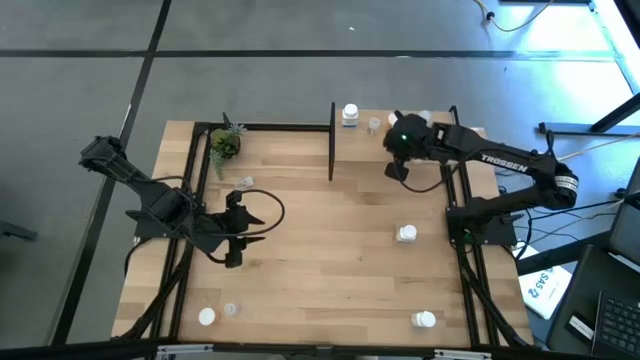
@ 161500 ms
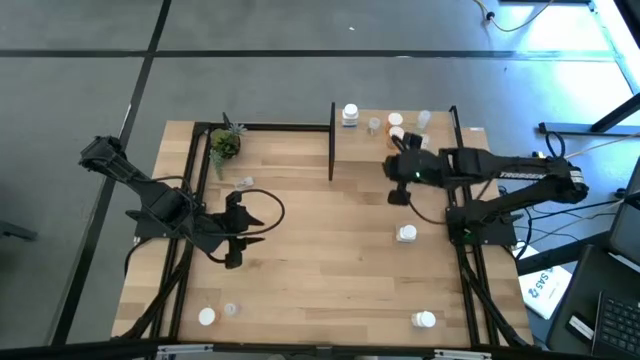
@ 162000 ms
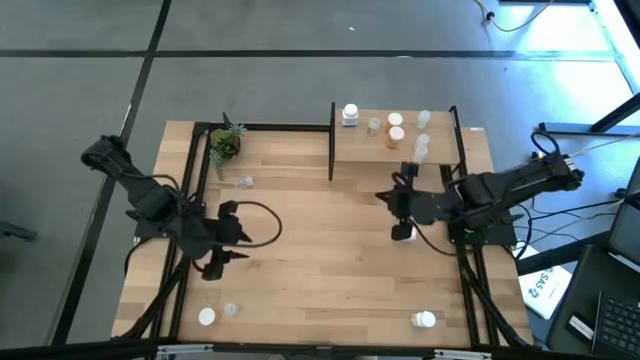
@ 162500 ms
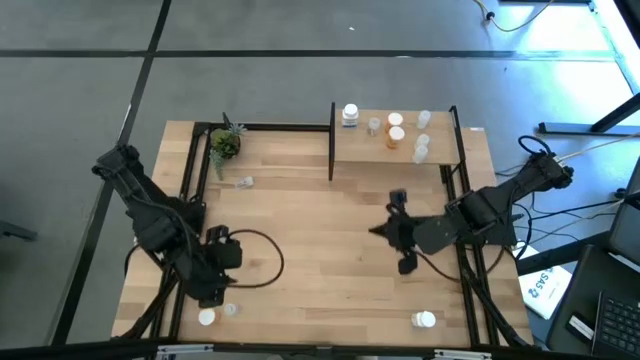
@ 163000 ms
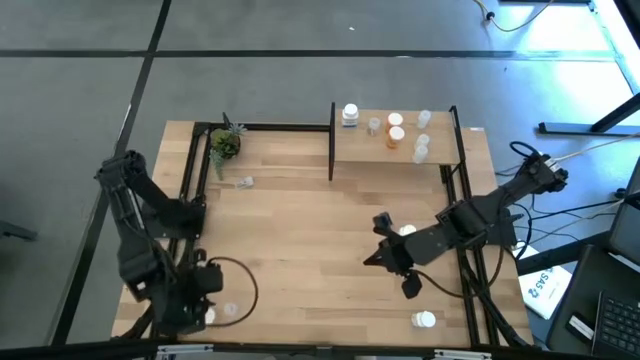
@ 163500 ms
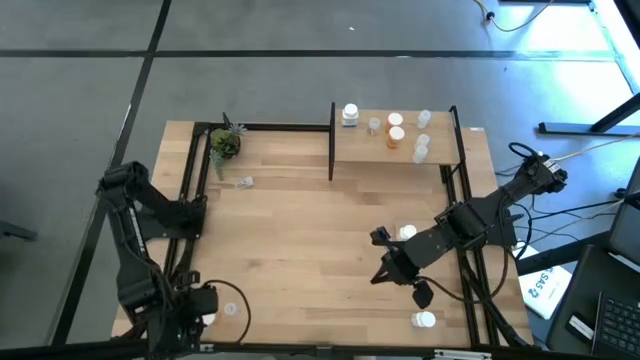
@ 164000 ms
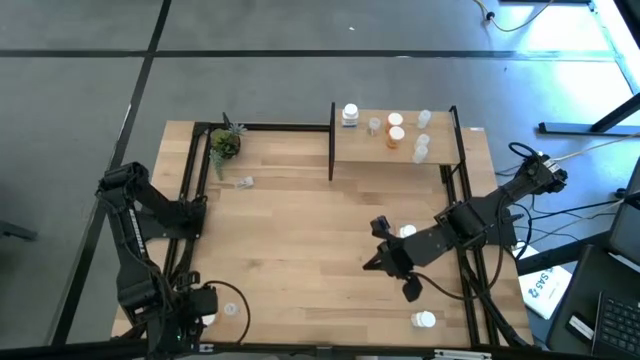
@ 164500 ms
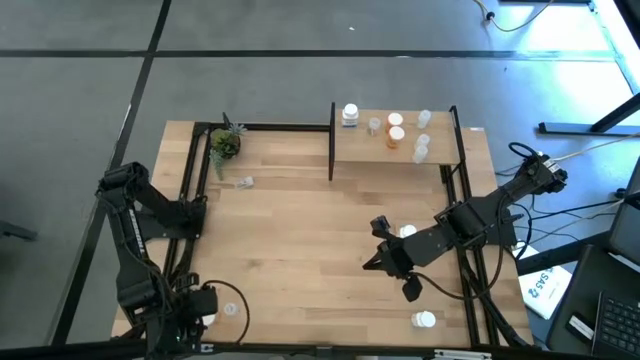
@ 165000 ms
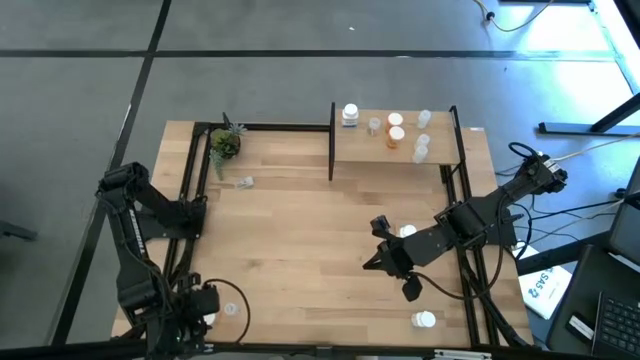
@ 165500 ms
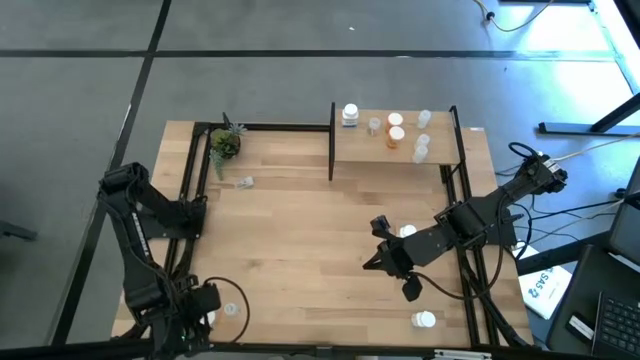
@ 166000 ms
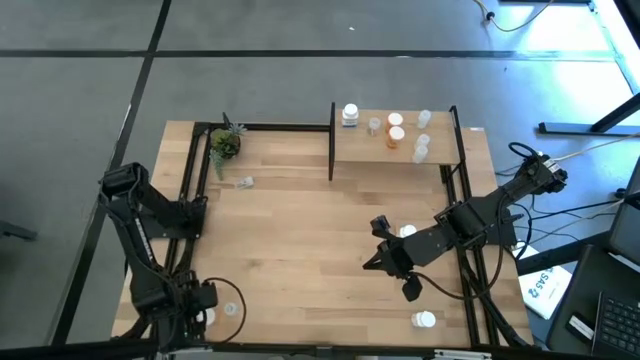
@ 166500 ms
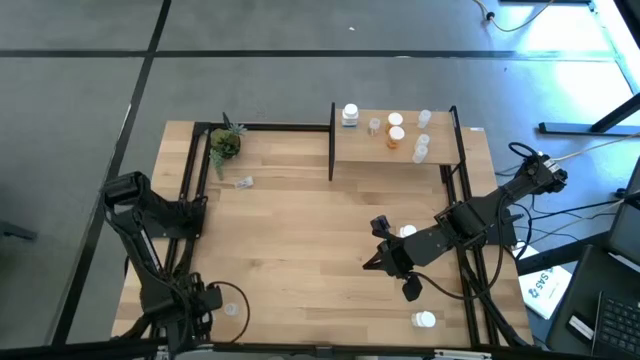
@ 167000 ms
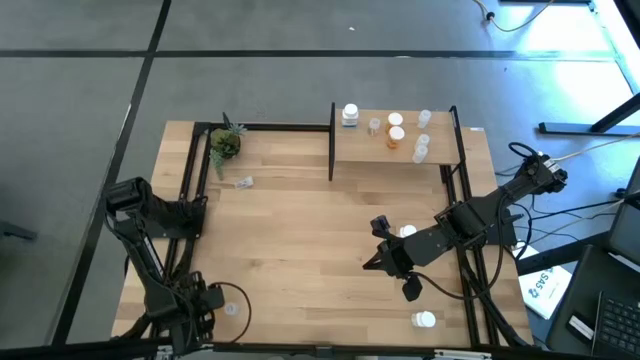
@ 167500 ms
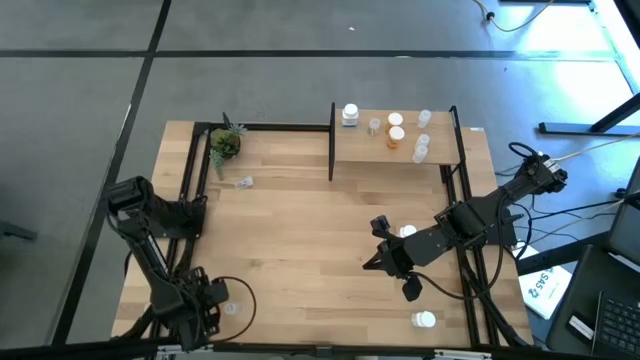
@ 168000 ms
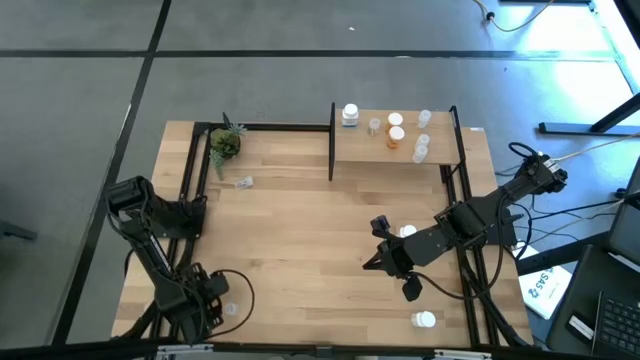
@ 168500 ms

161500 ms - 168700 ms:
Task: Pick and place medicine bottles onto shelf by color
Put the orange pill bottle on the shelf aligned with the other orange pill bottle

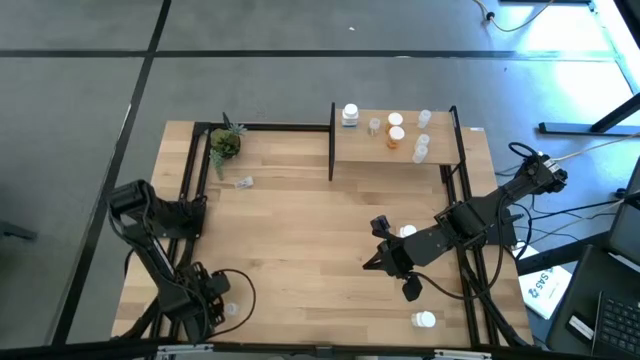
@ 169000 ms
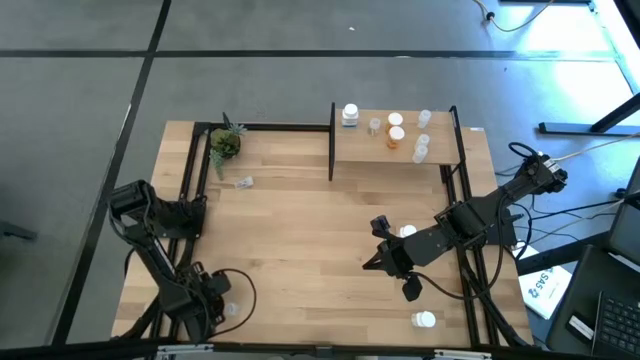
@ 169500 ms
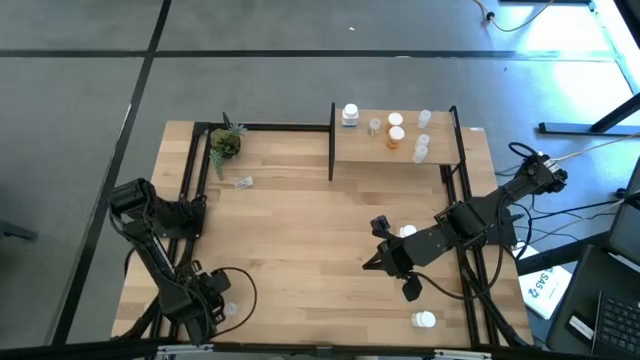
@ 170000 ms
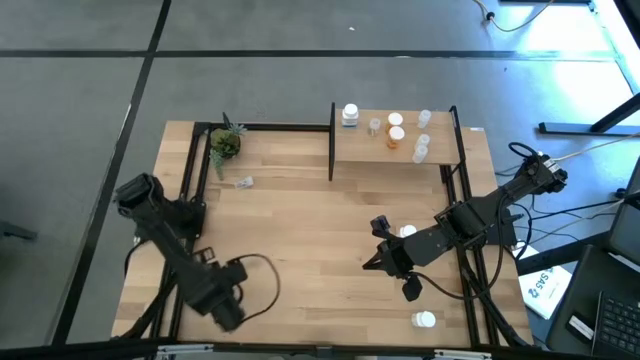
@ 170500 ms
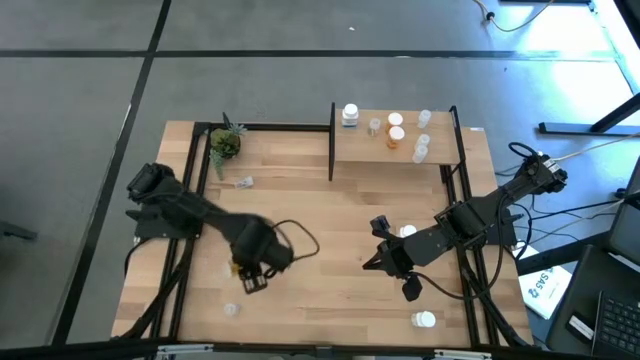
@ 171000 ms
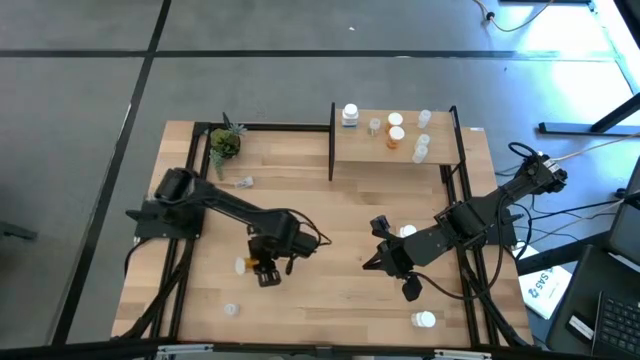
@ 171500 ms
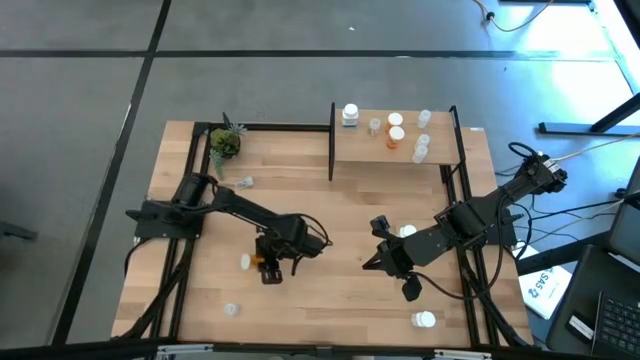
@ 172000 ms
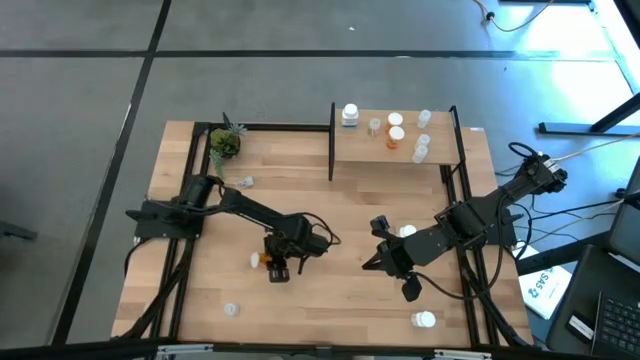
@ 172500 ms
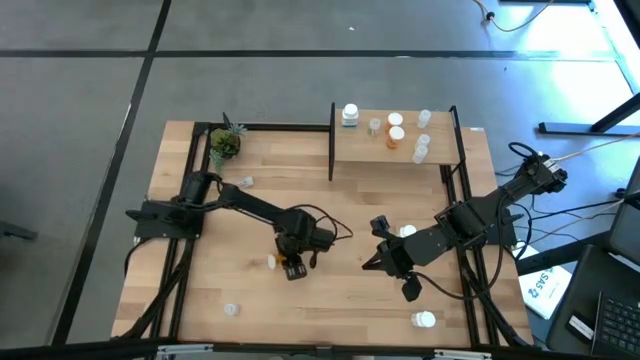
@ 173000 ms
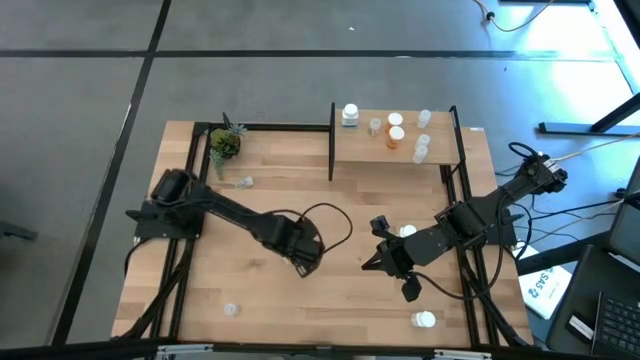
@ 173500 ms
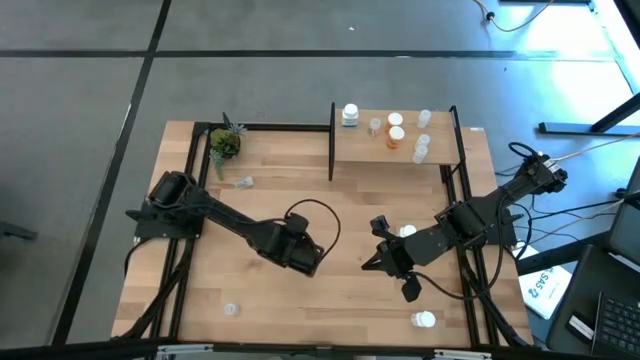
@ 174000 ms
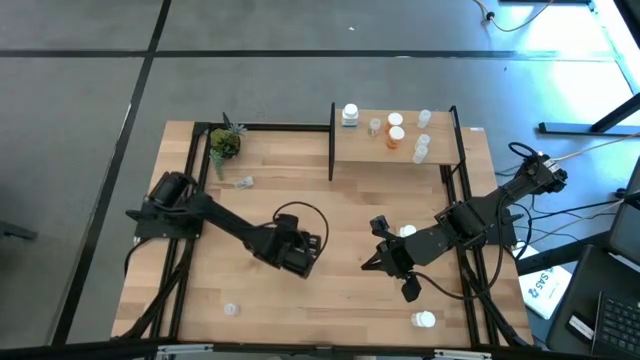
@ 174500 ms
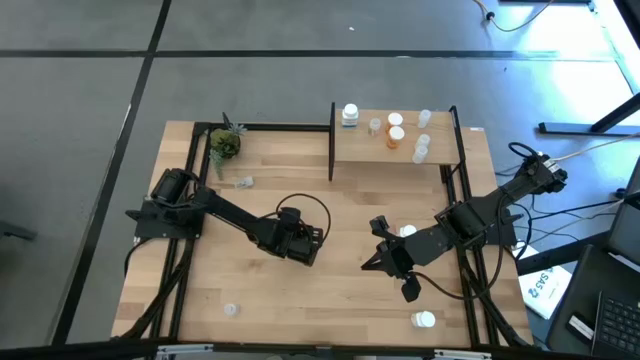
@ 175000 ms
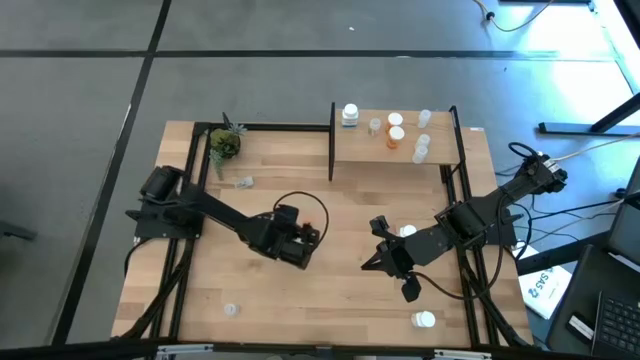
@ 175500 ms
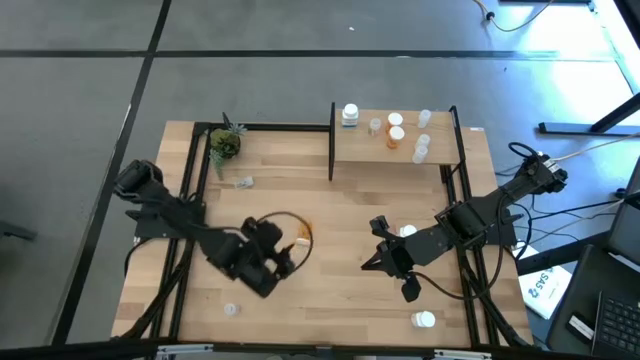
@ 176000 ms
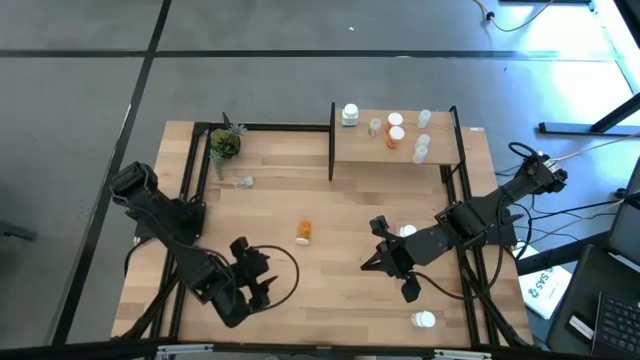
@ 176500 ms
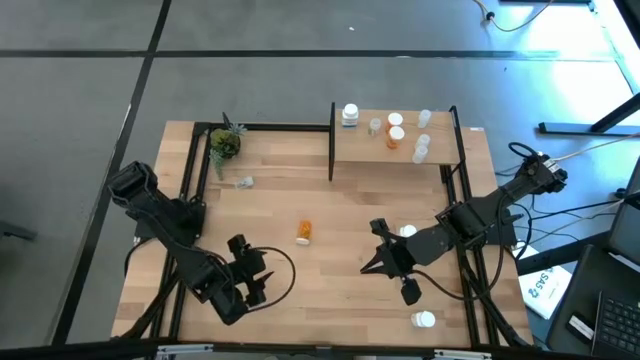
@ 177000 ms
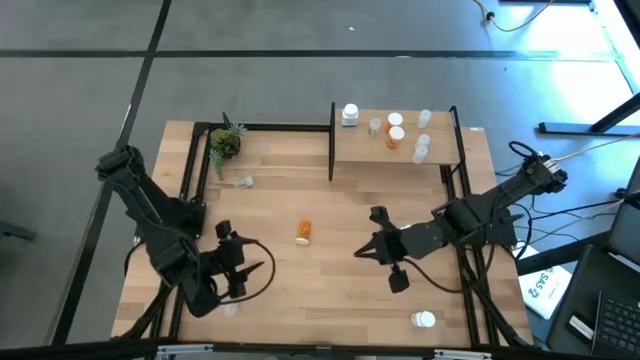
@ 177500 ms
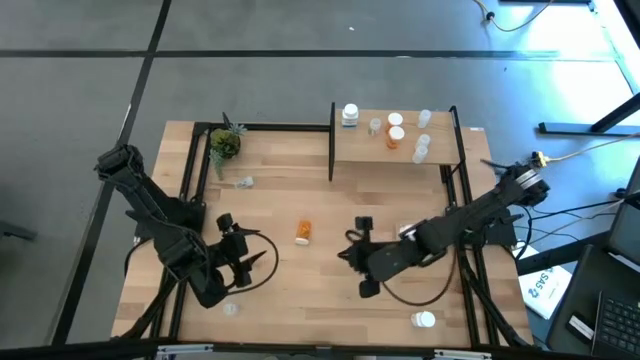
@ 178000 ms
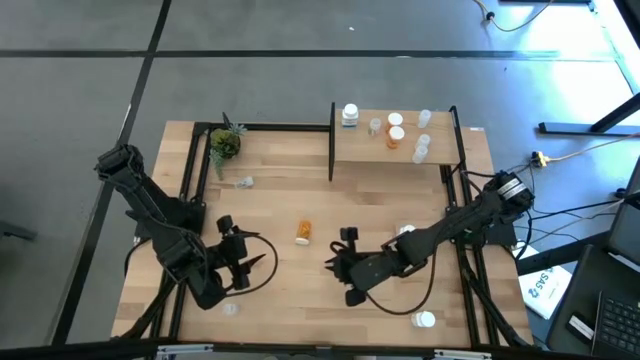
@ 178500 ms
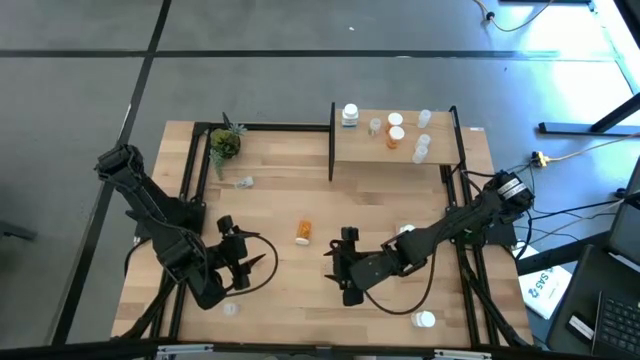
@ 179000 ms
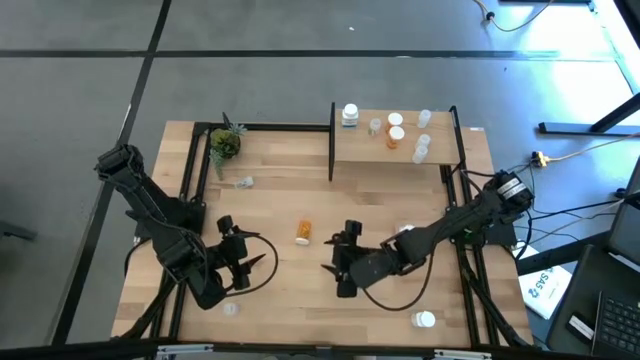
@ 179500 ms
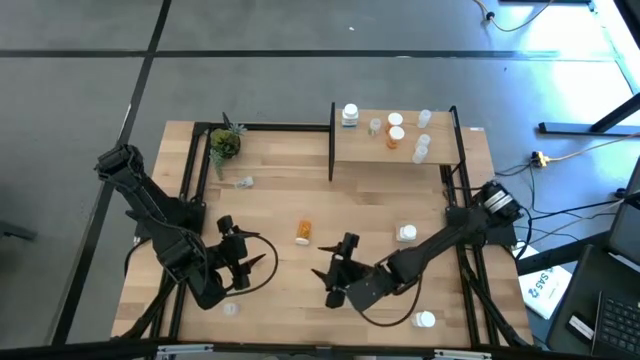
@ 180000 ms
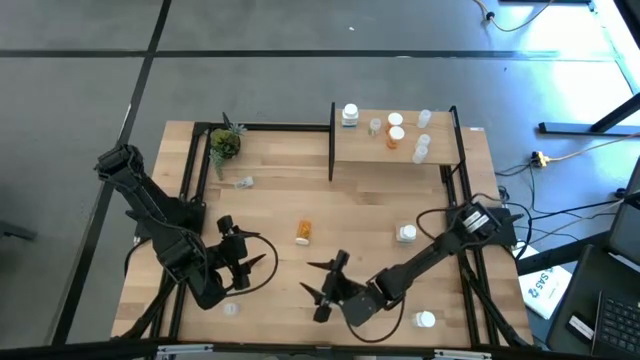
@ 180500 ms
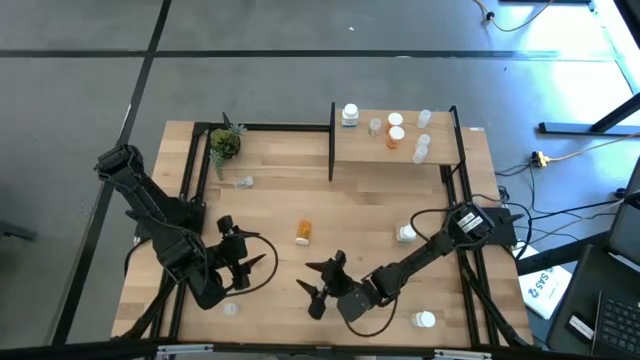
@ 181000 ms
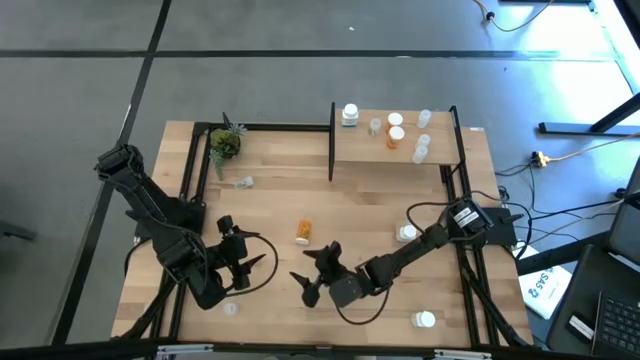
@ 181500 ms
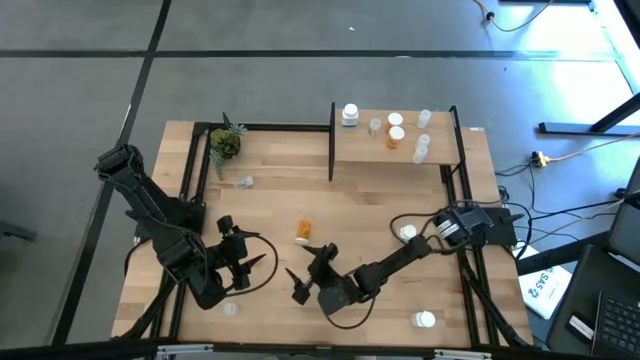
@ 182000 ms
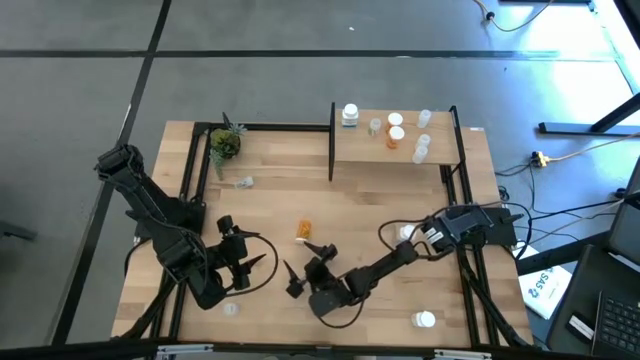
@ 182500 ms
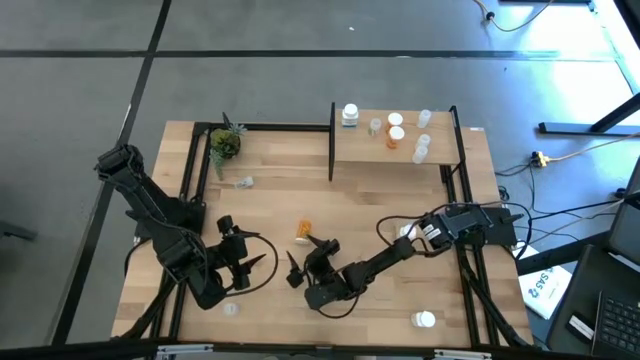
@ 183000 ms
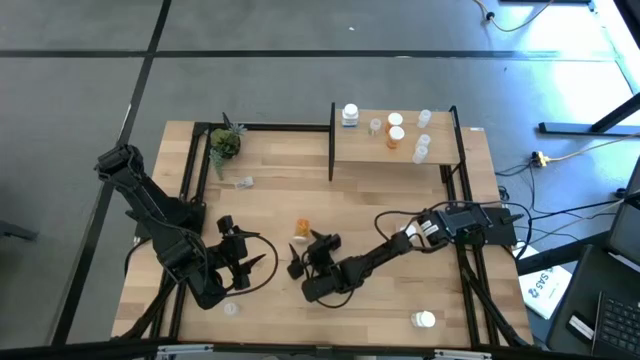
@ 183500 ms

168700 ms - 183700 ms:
Put the orange pill bottle on the shelf aligned with the other orange pill bottle
